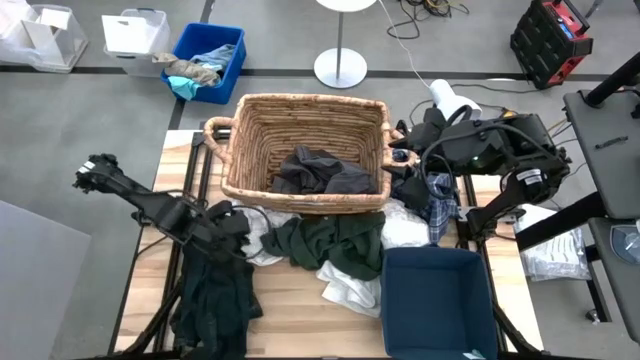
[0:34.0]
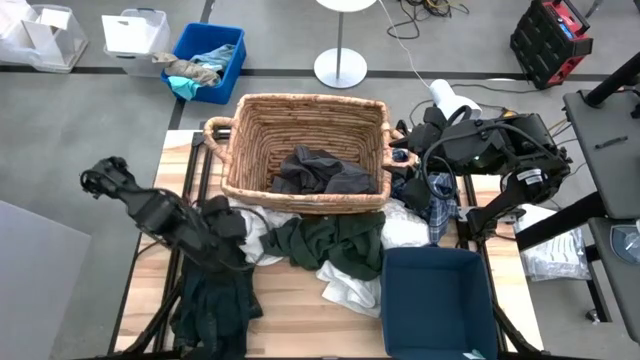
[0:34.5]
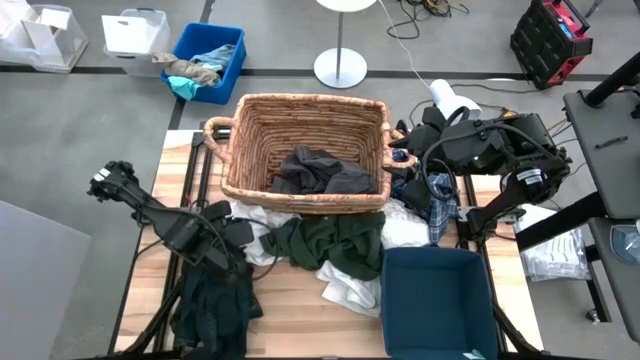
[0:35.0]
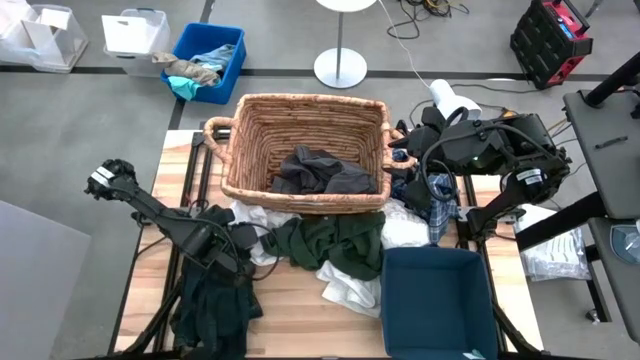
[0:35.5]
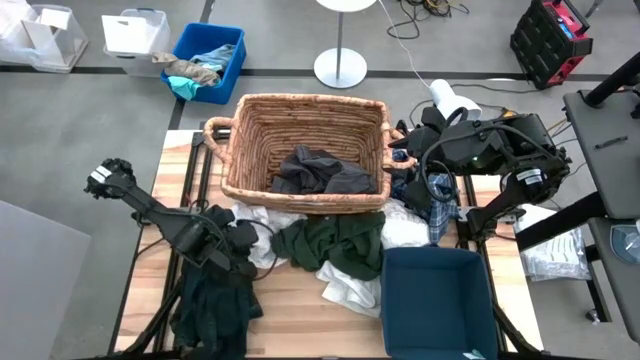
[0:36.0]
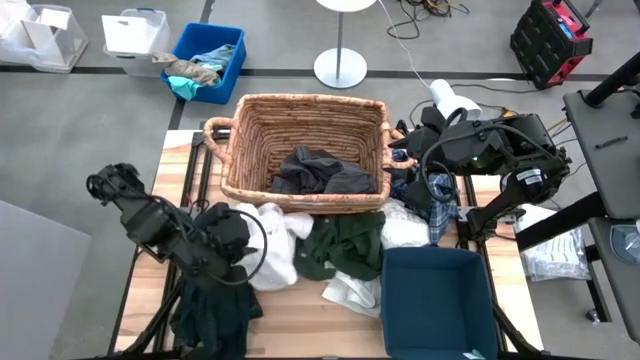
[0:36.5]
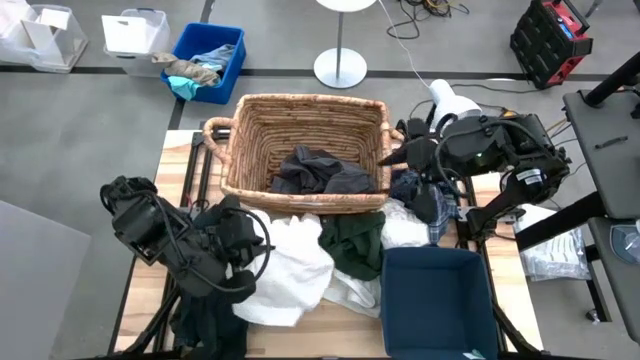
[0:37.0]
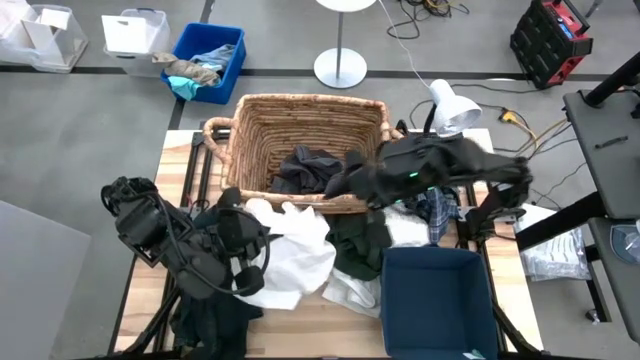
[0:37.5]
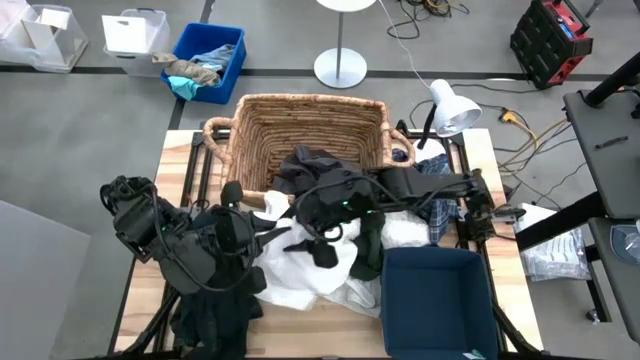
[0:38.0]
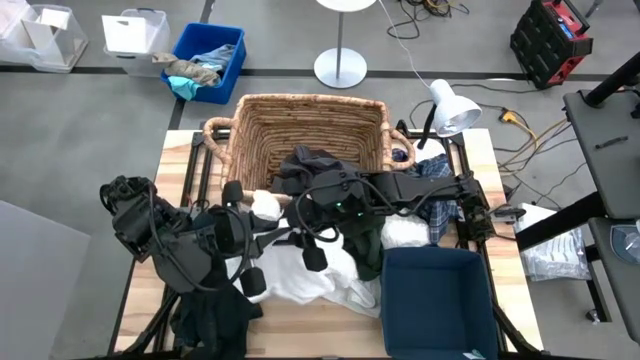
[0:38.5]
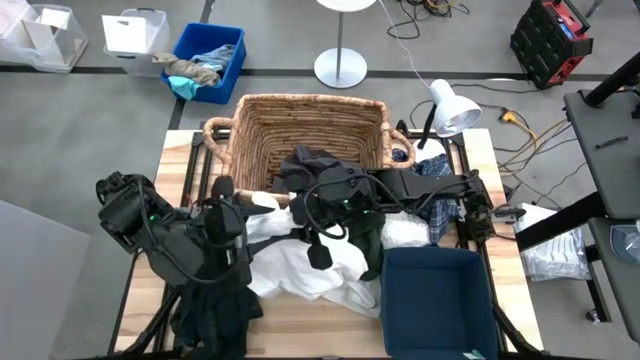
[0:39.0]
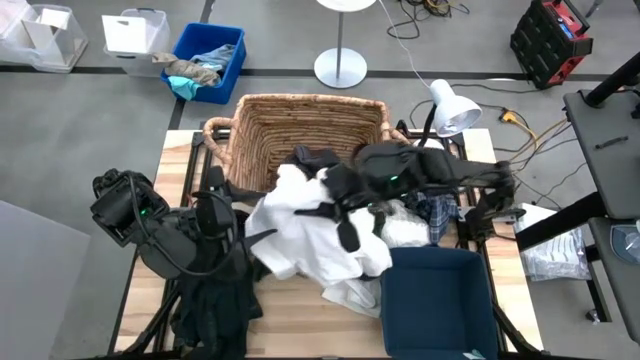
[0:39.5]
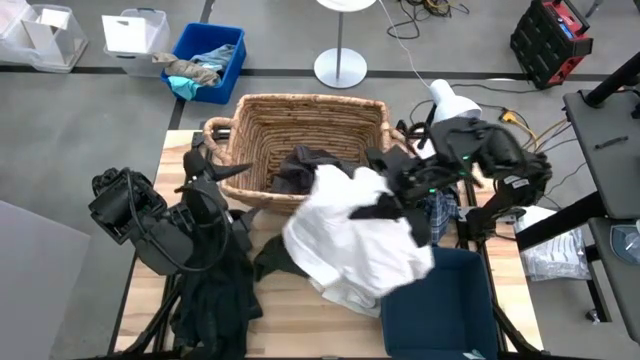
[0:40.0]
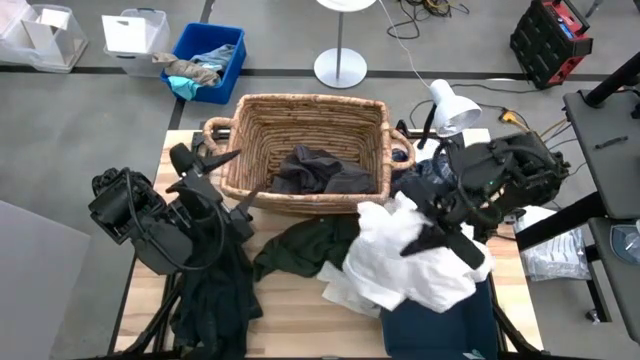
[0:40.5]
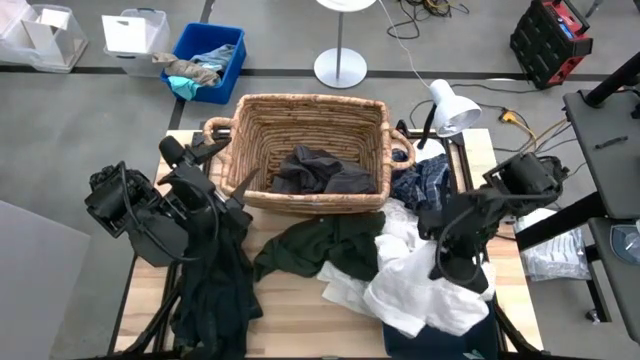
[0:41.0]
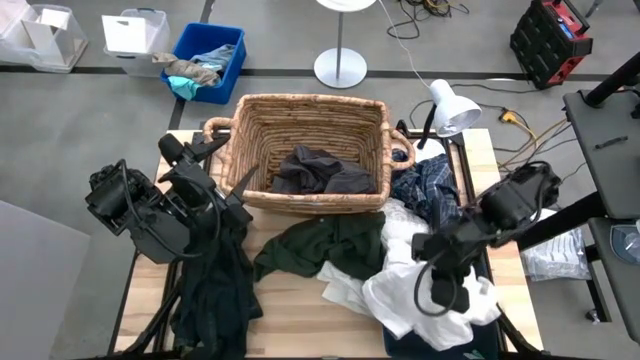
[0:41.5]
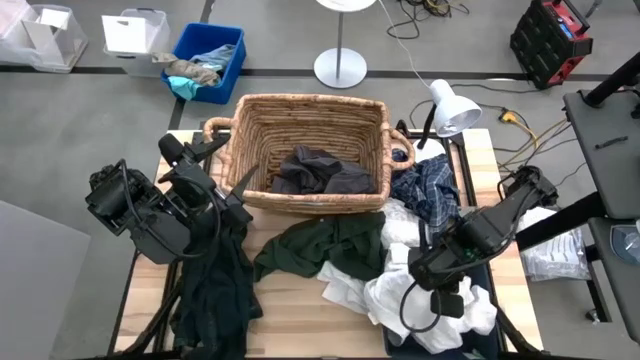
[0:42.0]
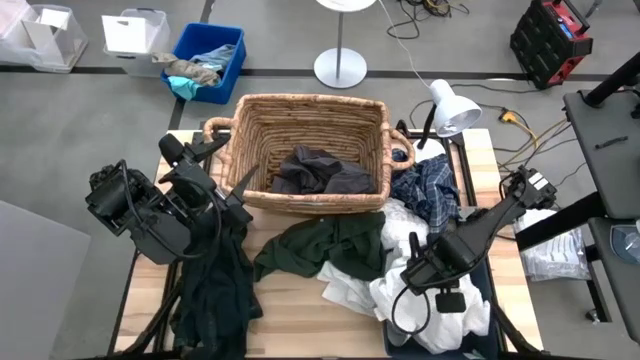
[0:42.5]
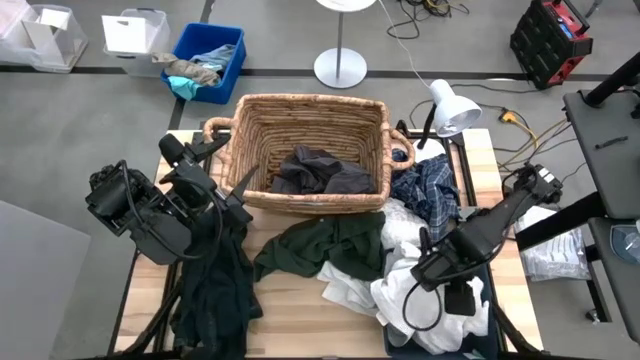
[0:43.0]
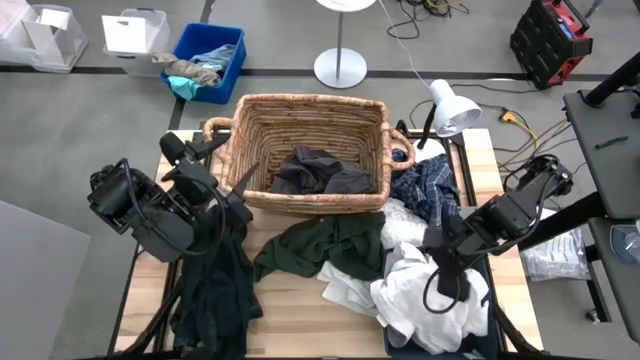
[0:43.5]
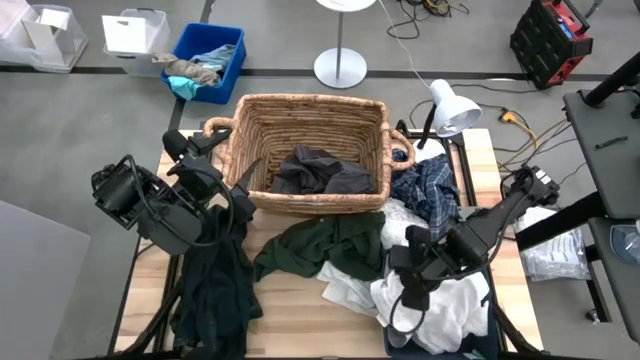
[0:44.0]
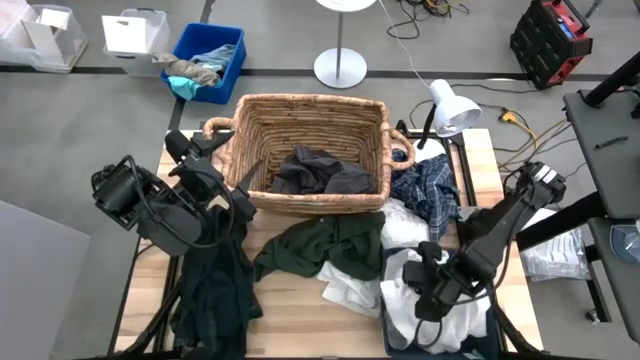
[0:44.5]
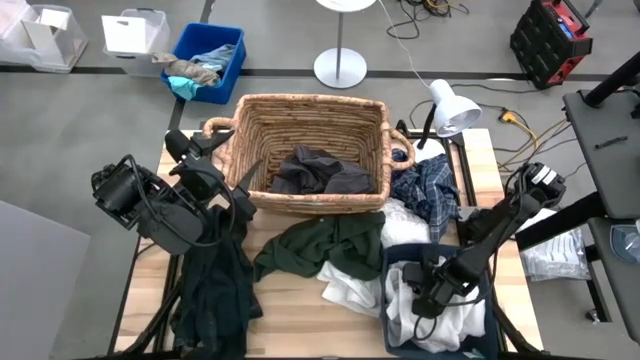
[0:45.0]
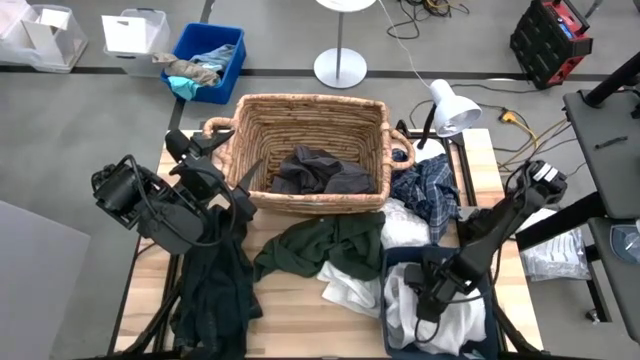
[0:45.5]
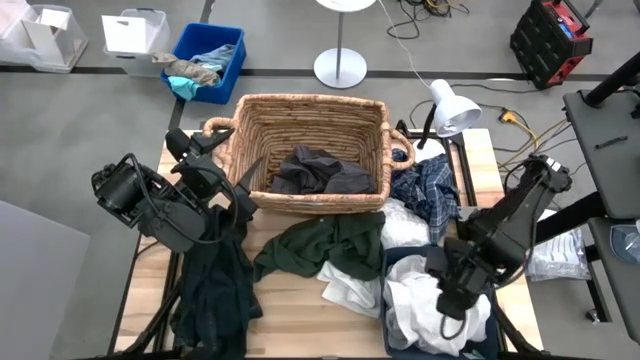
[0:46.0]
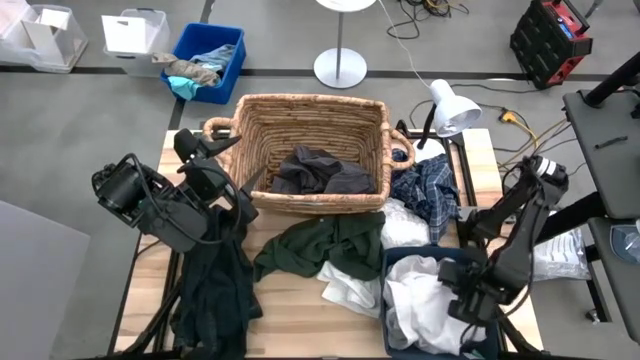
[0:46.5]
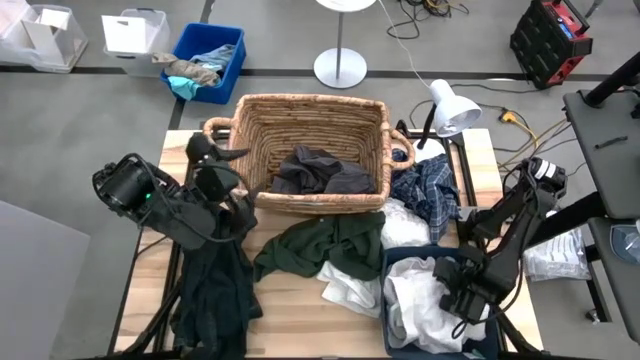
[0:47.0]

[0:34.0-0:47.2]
Task: Sort clothes
Put the white polo shirt into the blue laundry bin

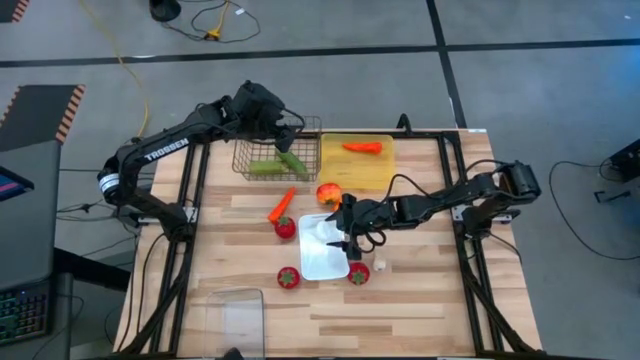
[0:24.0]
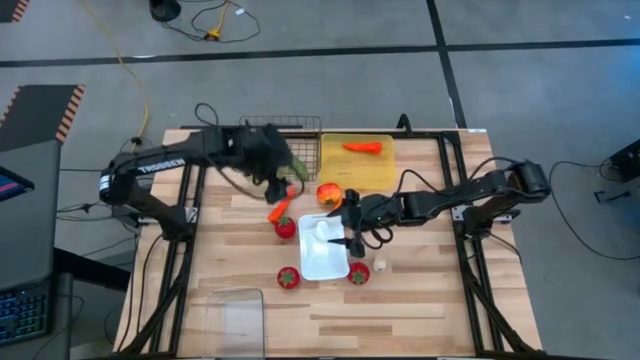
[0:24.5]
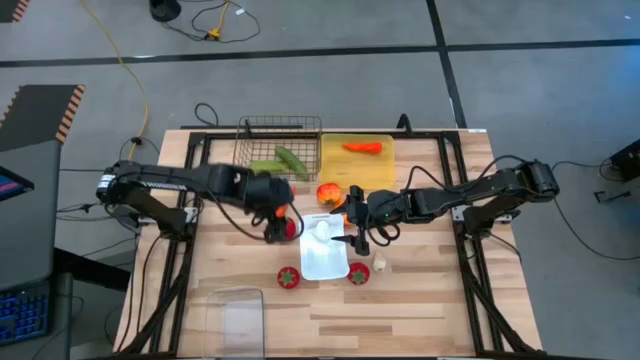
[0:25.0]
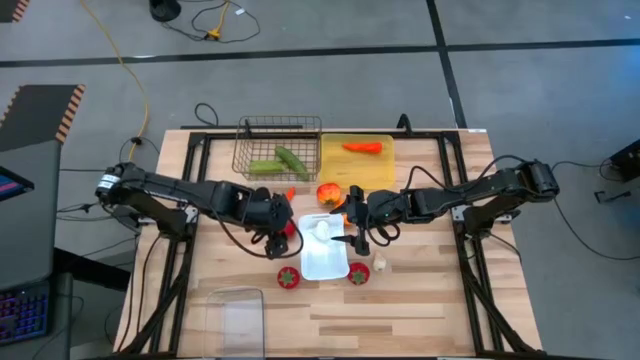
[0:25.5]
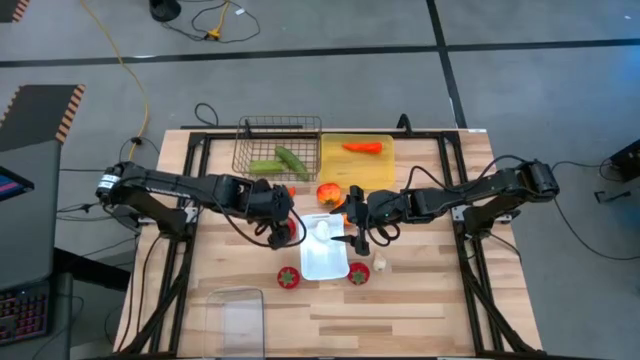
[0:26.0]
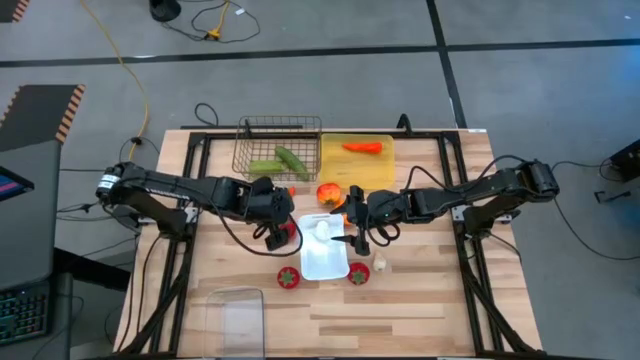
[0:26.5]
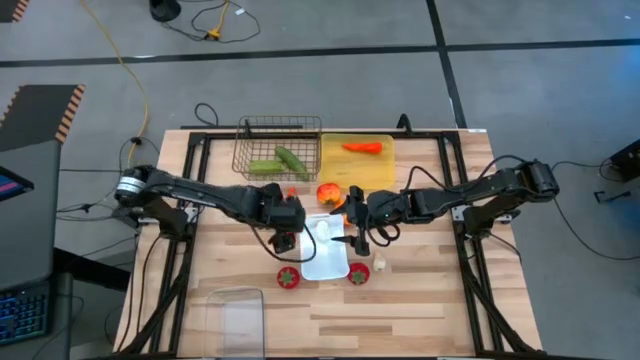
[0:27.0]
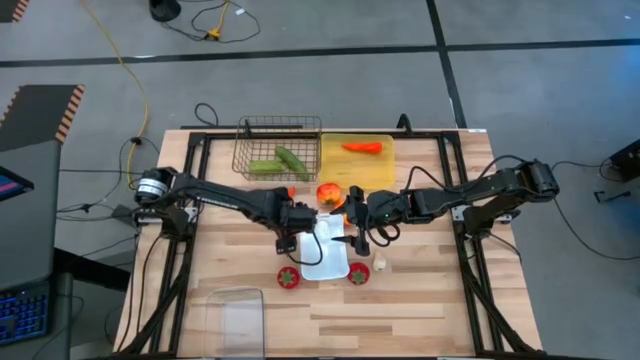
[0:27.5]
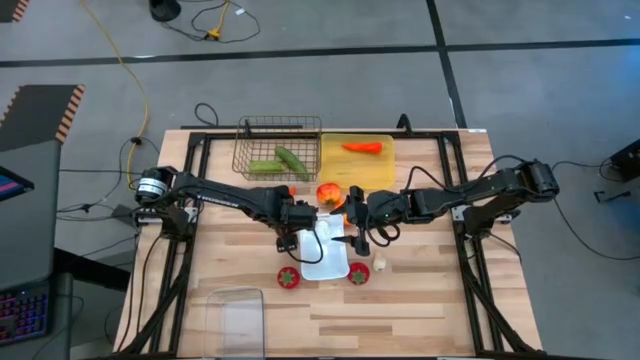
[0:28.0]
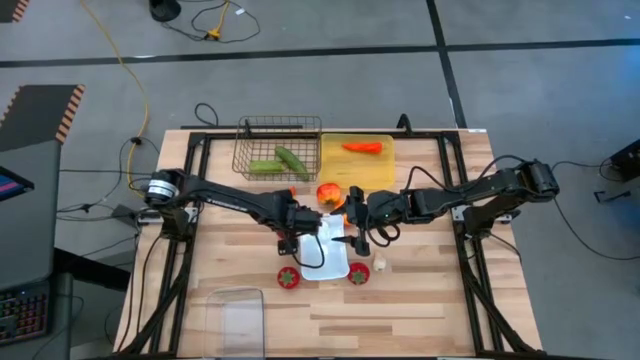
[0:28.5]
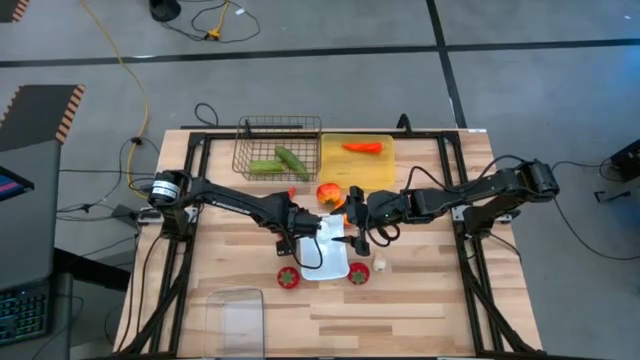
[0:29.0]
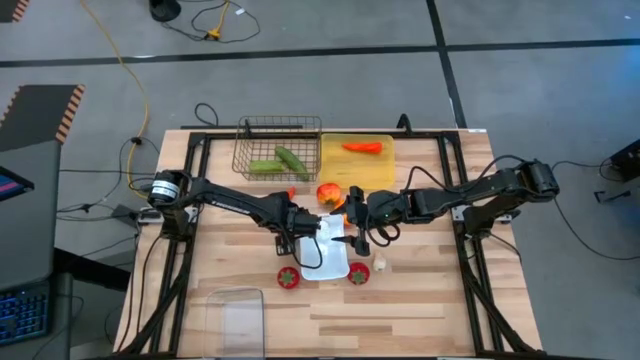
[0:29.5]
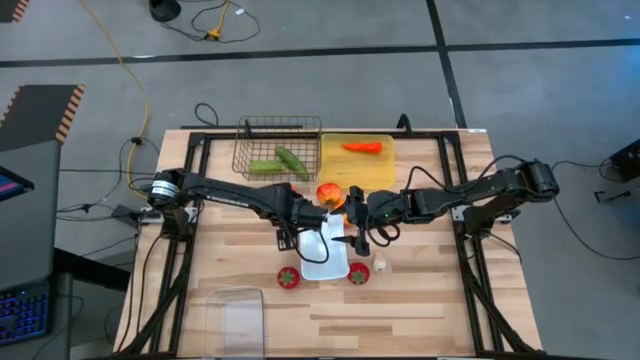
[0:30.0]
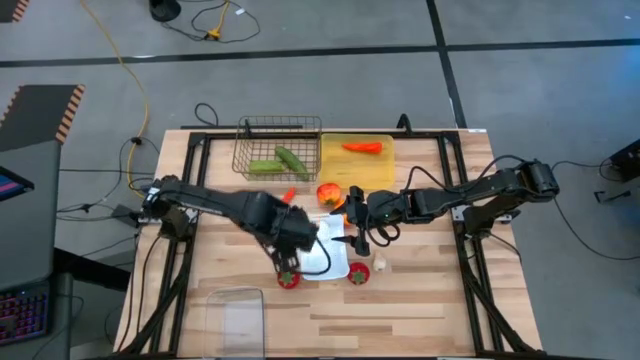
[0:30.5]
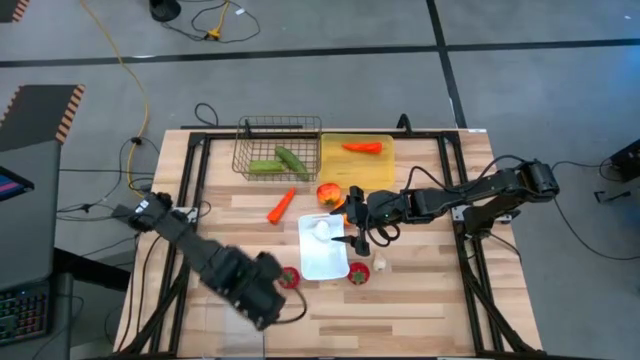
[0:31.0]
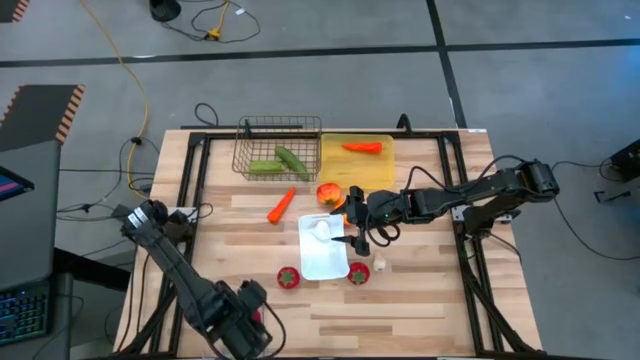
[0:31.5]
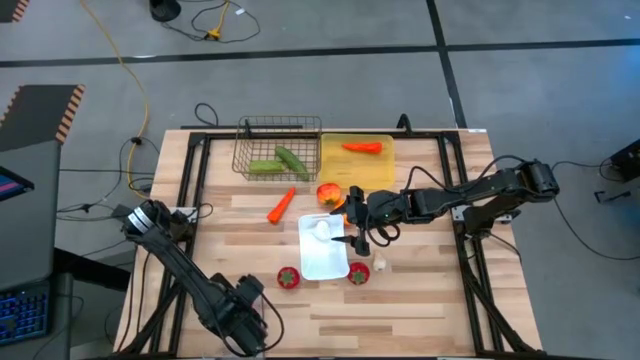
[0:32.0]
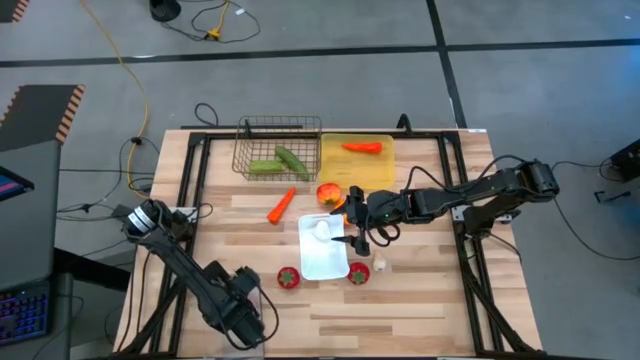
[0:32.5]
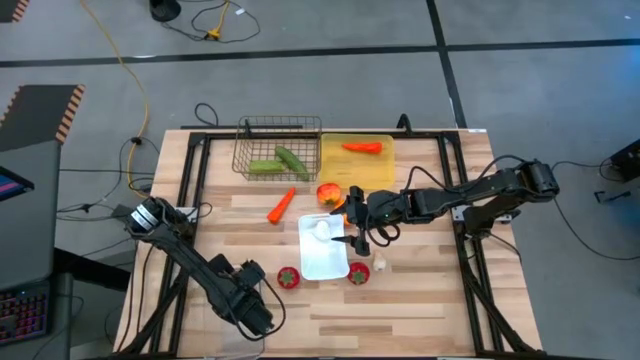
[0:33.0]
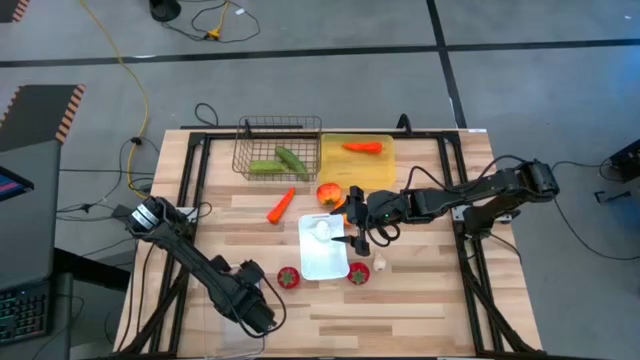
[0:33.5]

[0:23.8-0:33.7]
Task: Sort produce into baskets
Put the top left red tomato into the transparent bin
